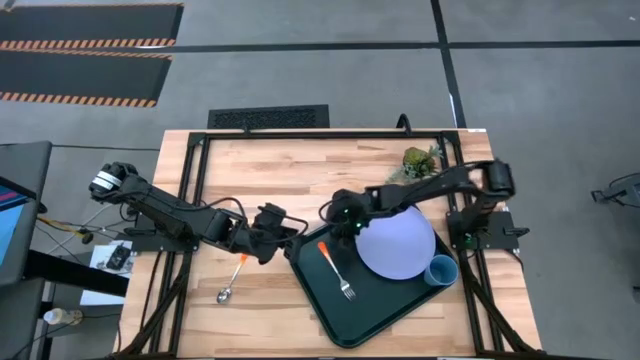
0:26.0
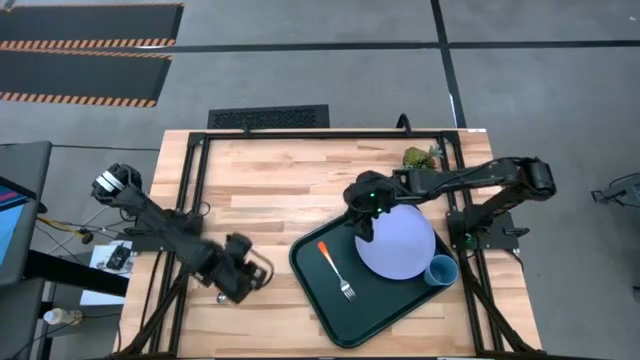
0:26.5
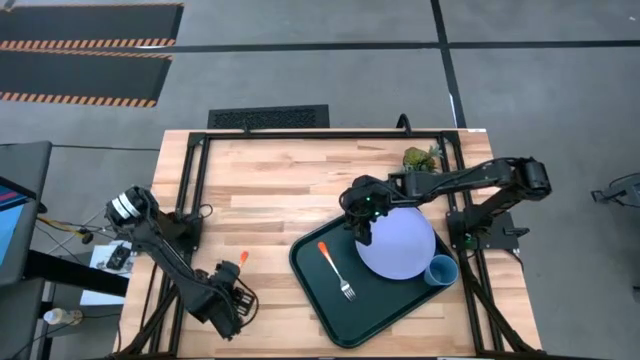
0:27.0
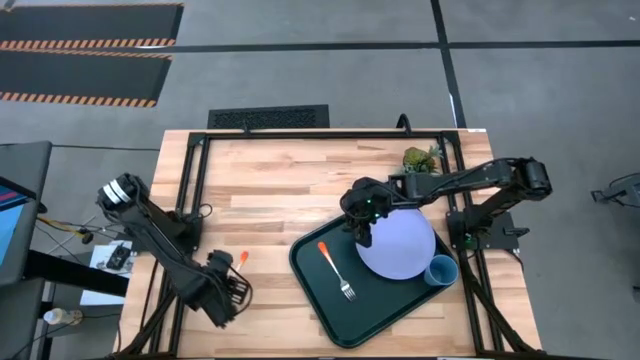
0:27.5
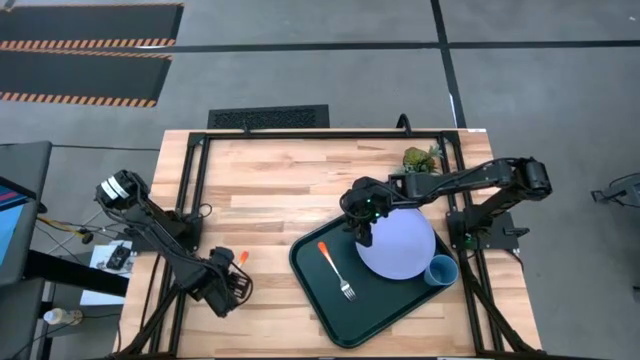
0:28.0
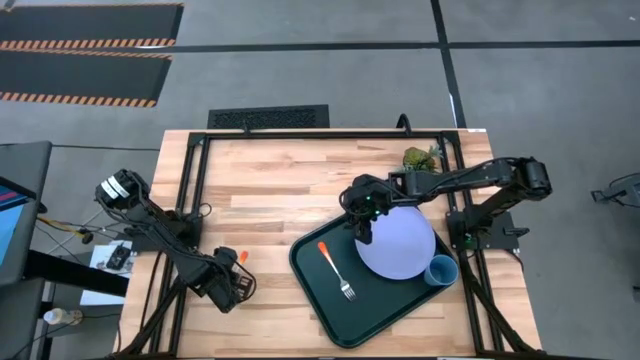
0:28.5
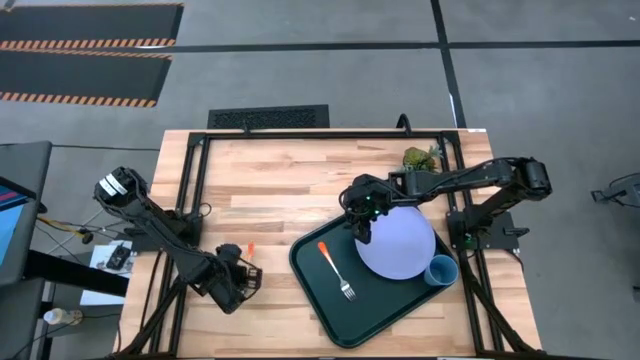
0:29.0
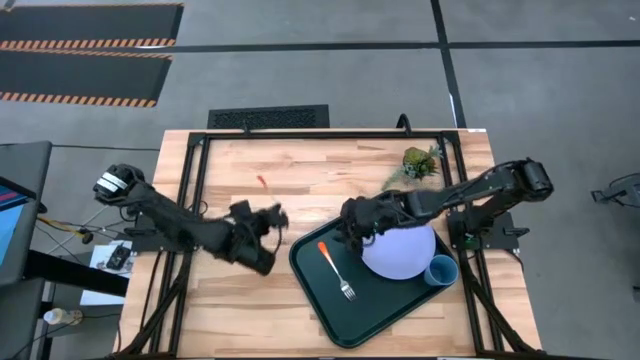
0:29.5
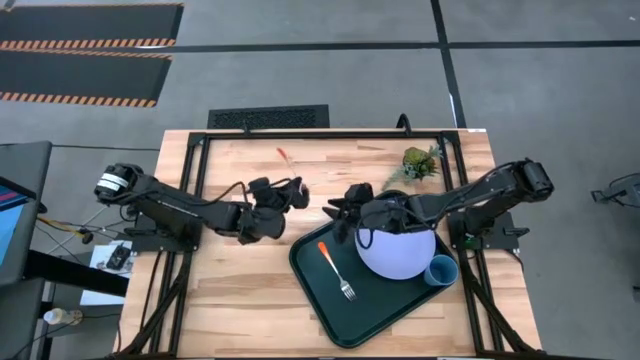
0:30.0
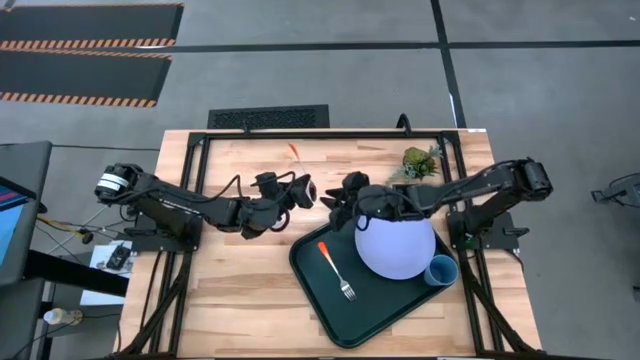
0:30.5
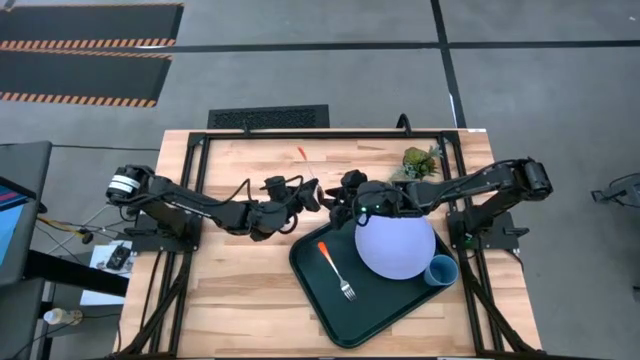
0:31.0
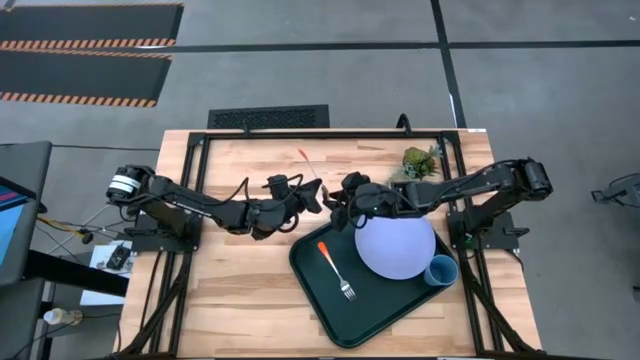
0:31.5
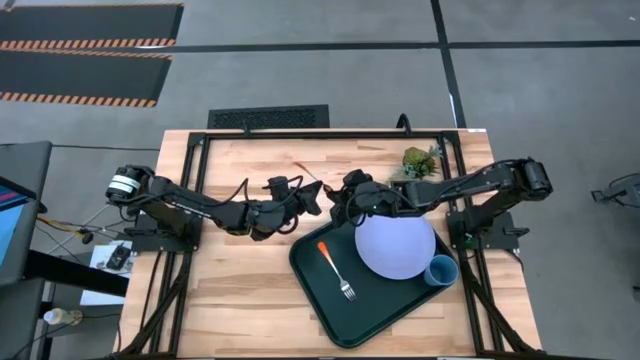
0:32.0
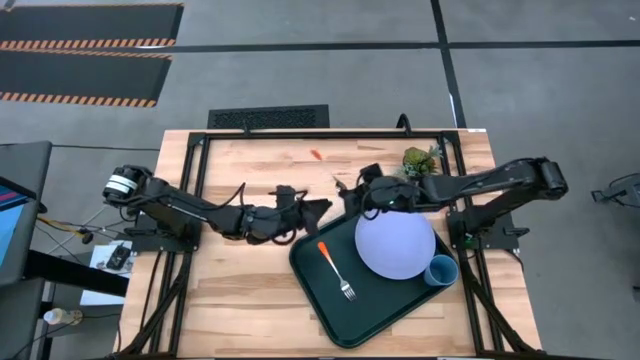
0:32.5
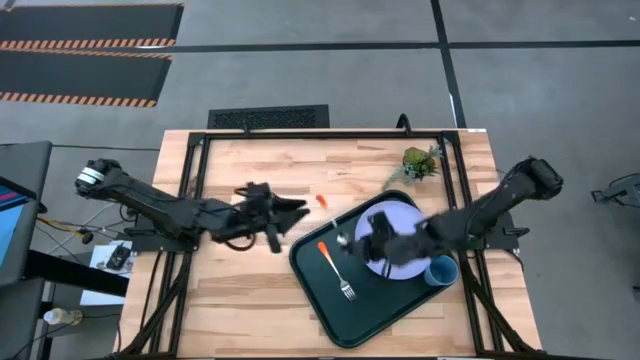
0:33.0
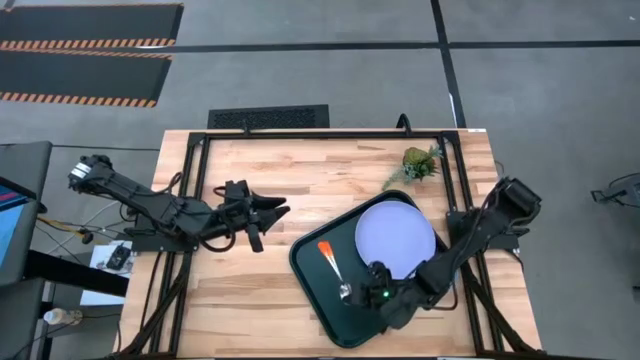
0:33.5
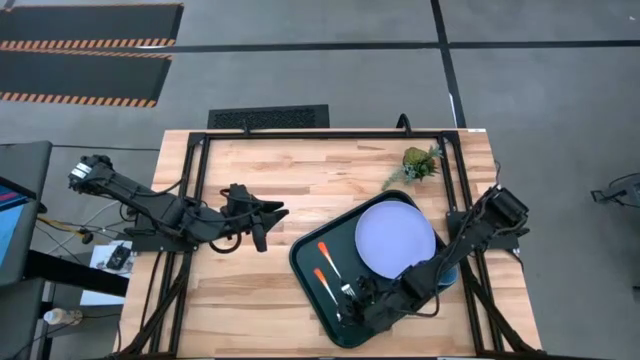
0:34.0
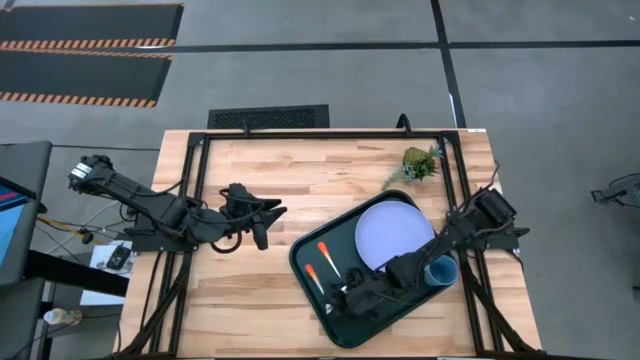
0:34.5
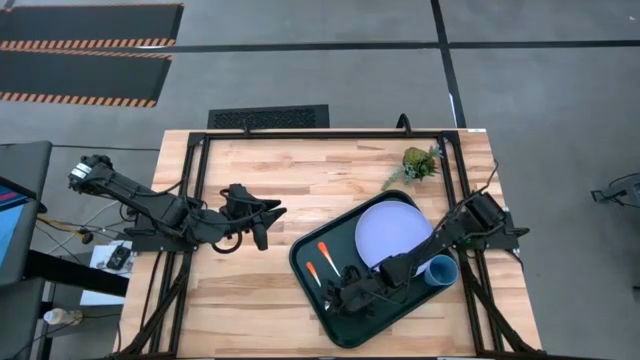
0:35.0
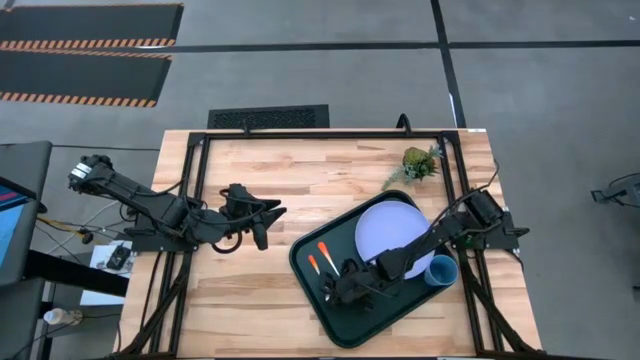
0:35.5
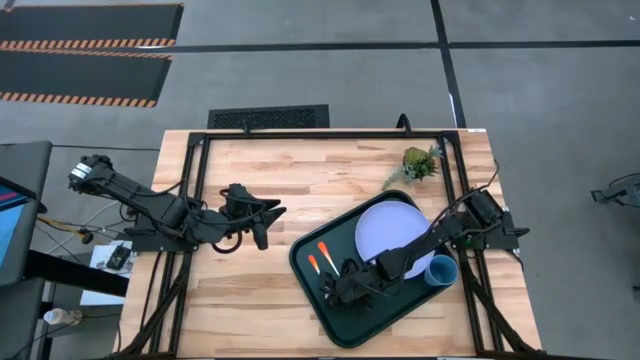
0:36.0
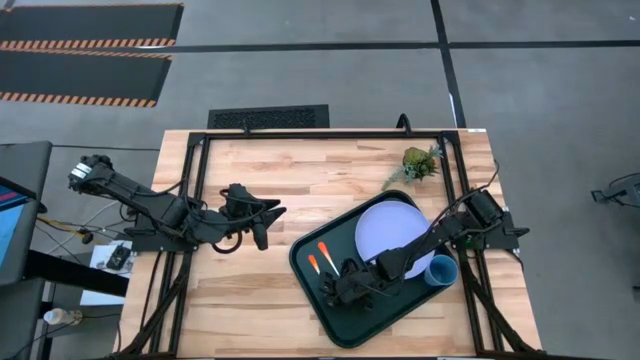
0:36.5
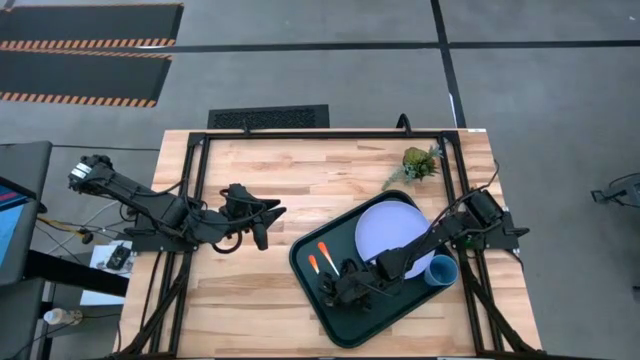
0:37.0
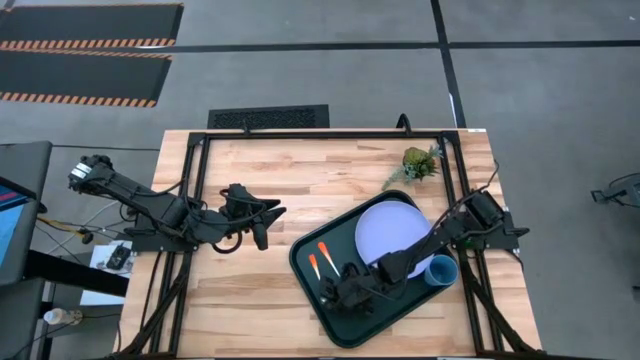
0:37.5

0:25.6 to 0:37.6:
Task: Pick and place plate/cup/fork/spoon on tray
Put the orange spoon to the right of the orange fork on the green serving tray

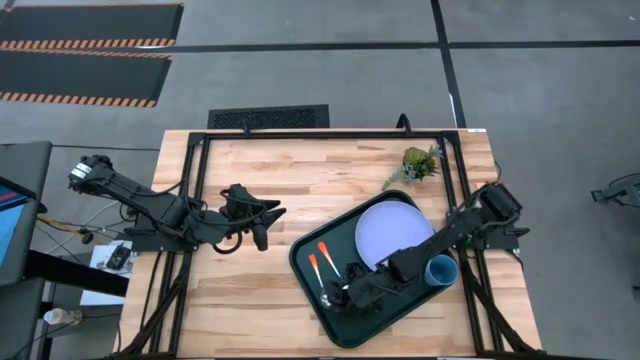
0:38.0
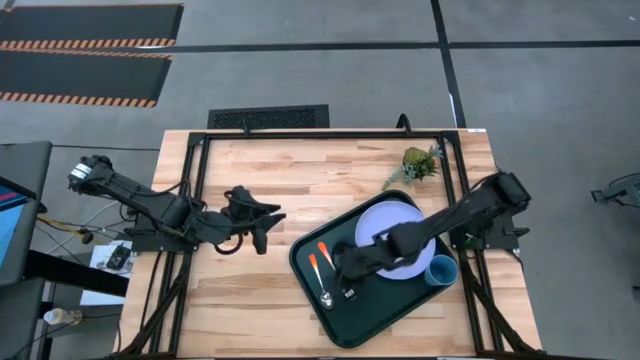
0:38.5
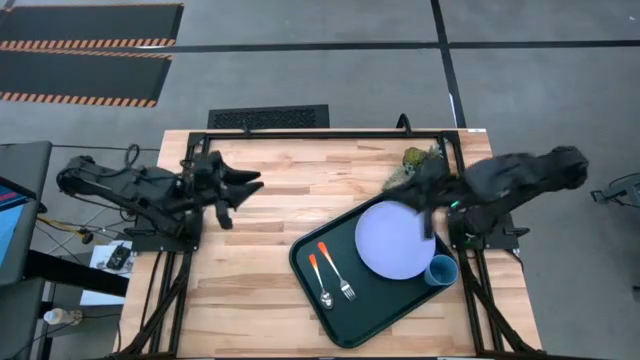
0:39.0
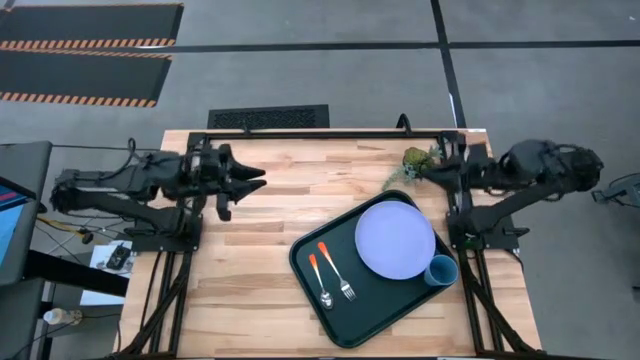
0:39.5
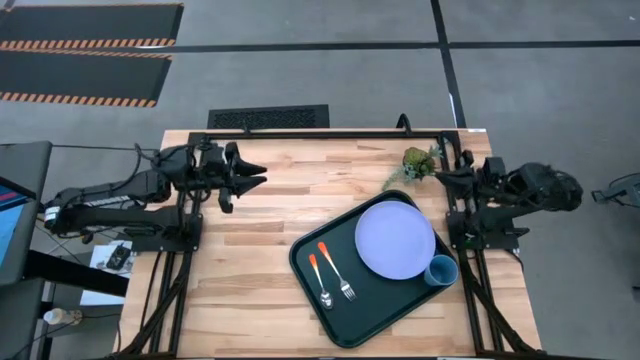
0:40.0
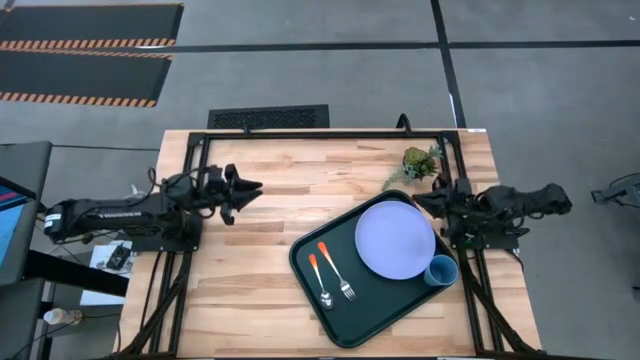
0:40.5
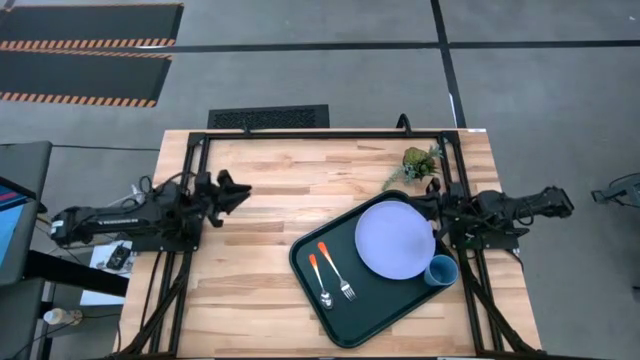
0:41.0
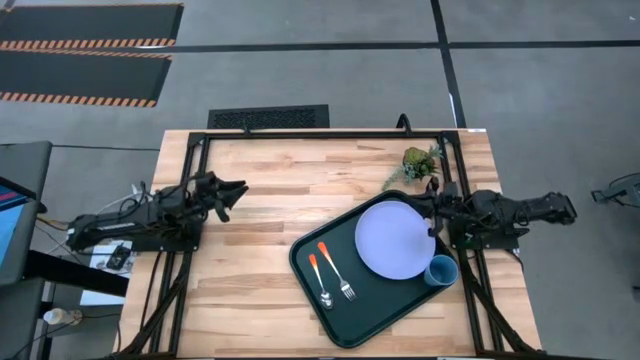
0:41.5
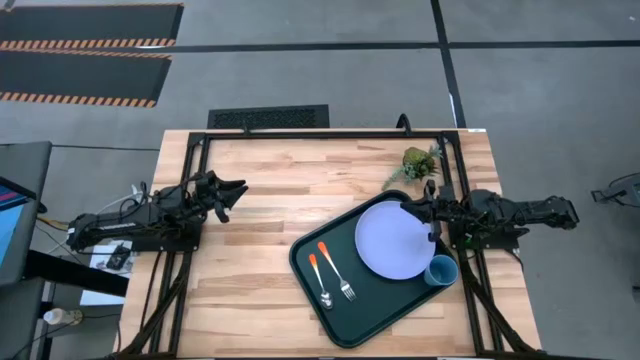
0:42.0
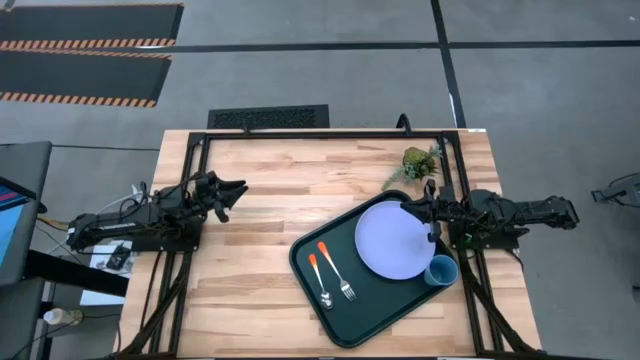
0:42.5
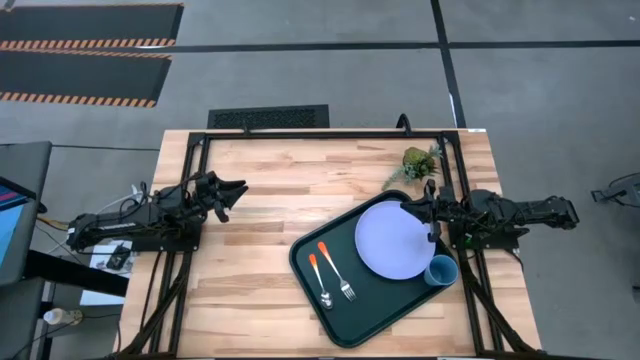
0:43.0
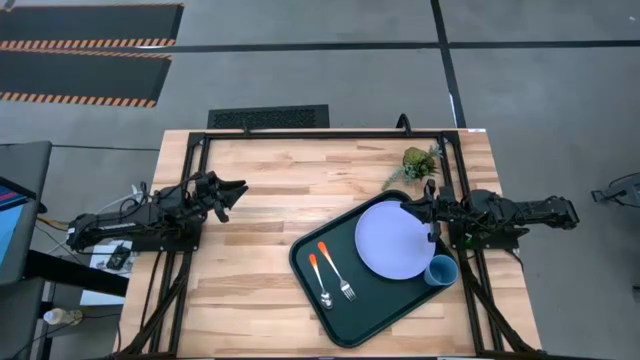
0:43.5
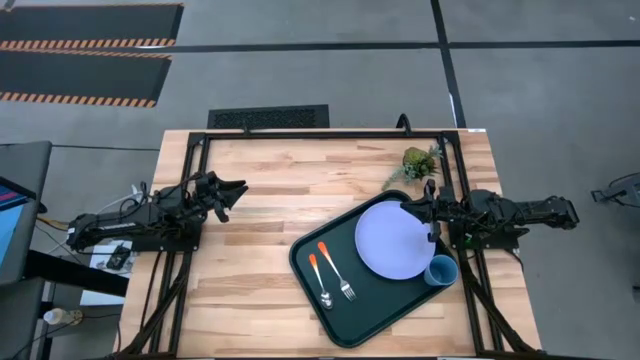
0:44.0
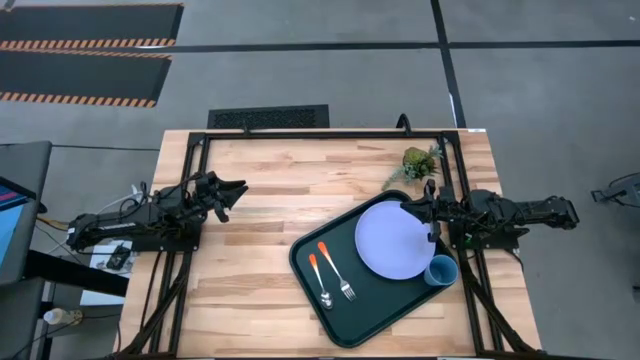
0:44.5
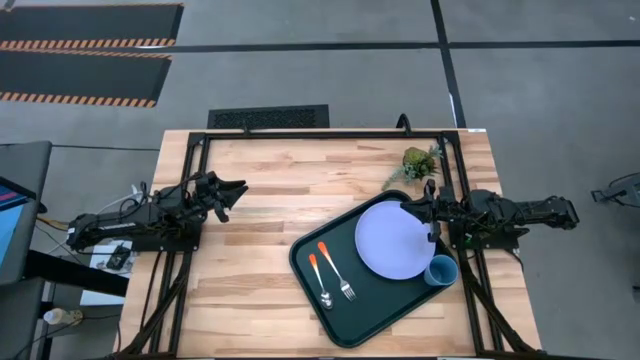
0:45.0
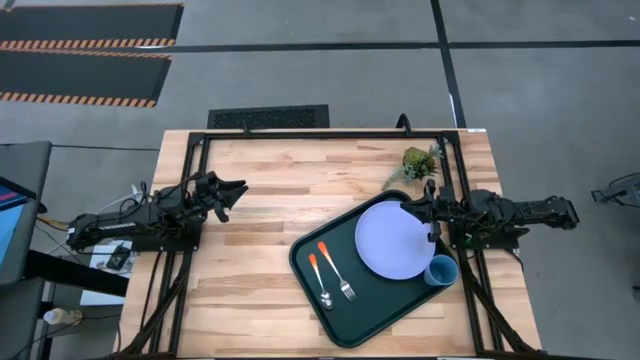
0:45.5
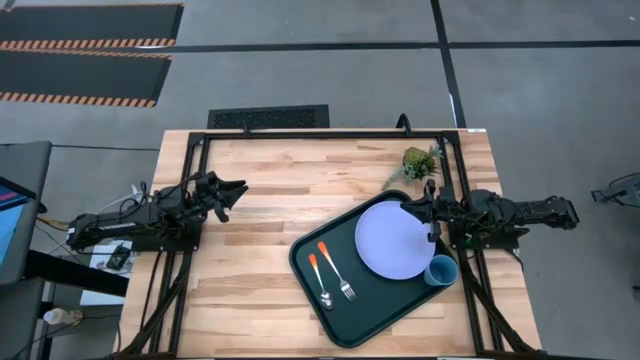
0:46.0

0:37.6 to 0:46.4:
Return to Home Position

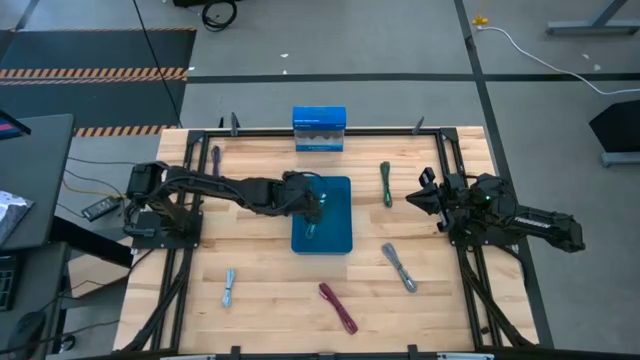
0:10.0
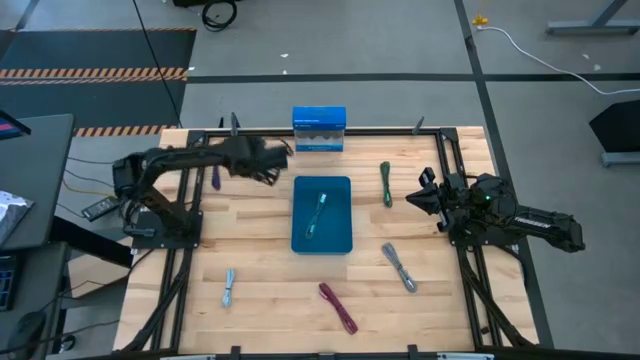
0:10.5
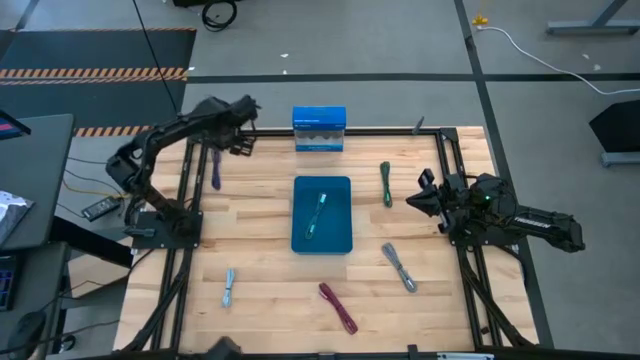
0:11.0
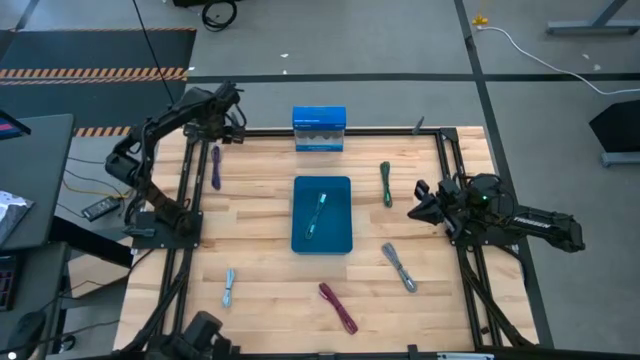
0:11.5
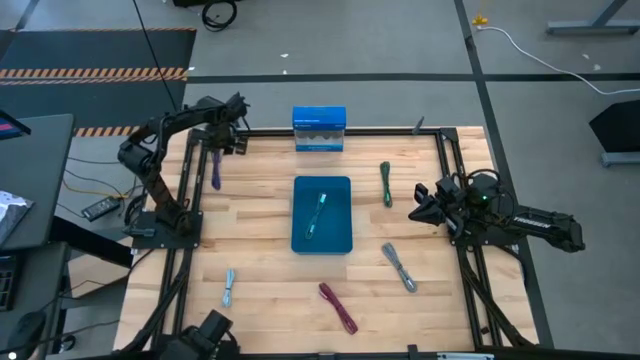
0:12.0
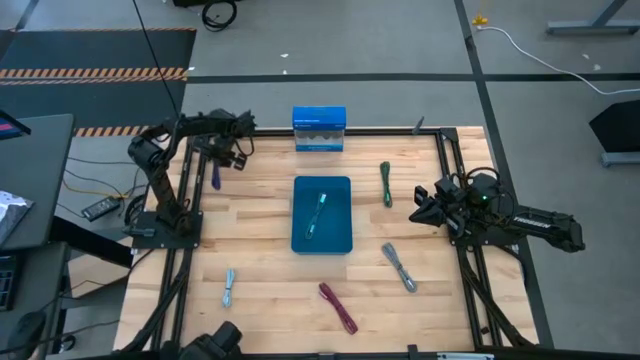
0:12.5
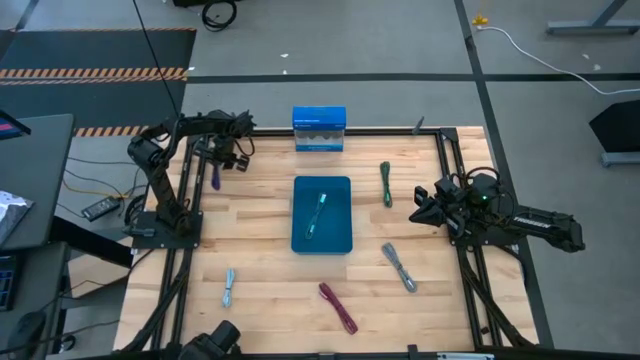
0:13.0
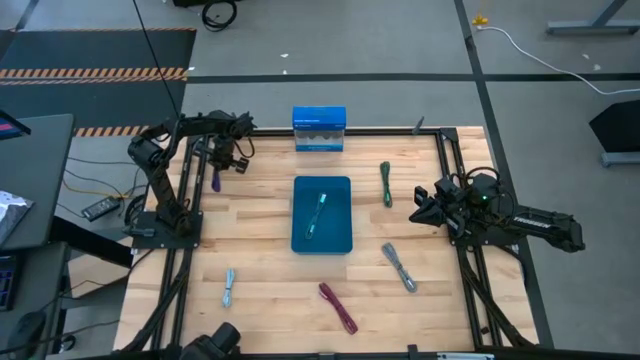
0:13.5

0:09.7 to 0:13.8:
Task: Pick and place USB-C Cables
Put the violet charger cable into the blue bin
